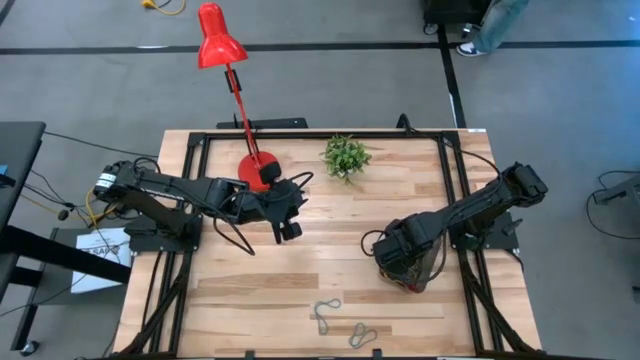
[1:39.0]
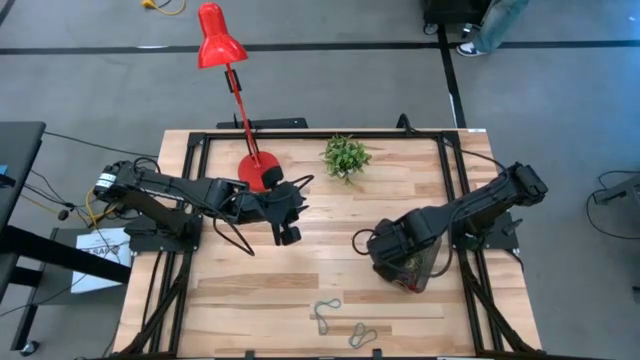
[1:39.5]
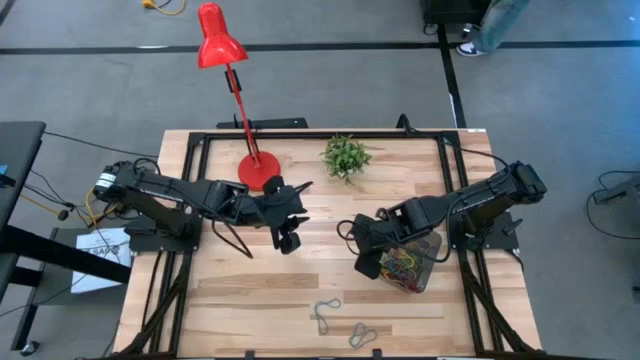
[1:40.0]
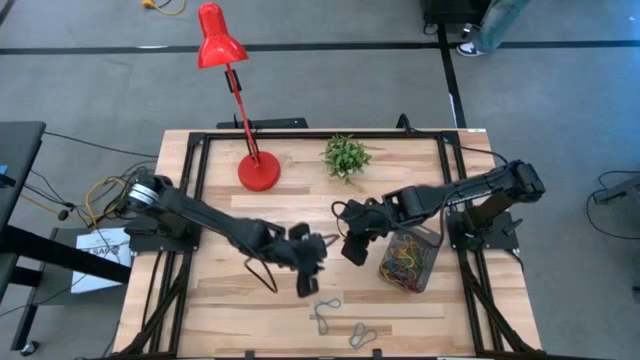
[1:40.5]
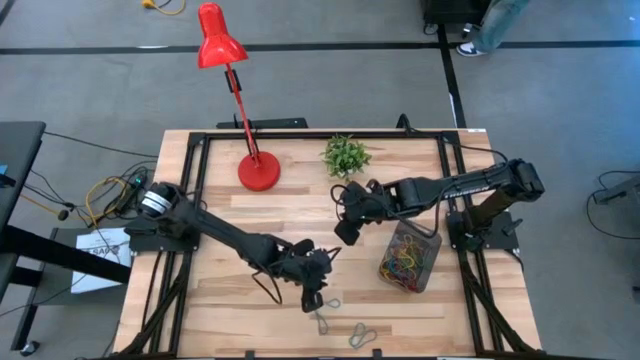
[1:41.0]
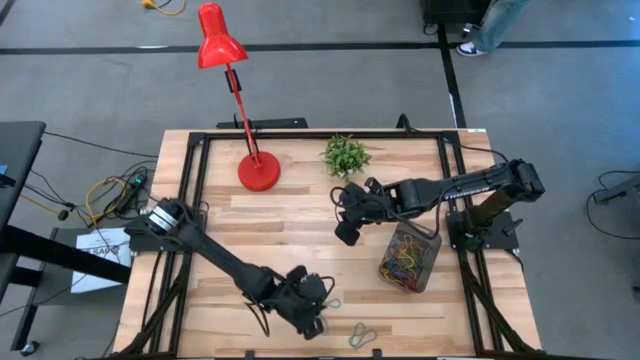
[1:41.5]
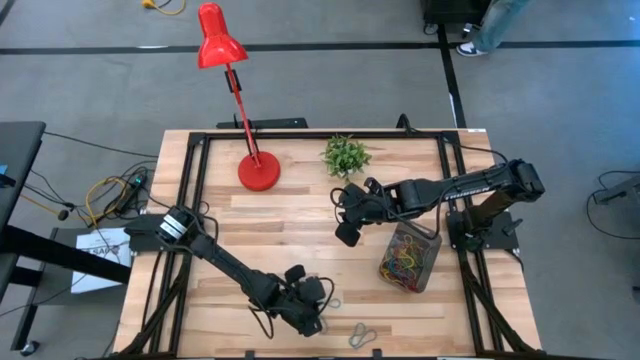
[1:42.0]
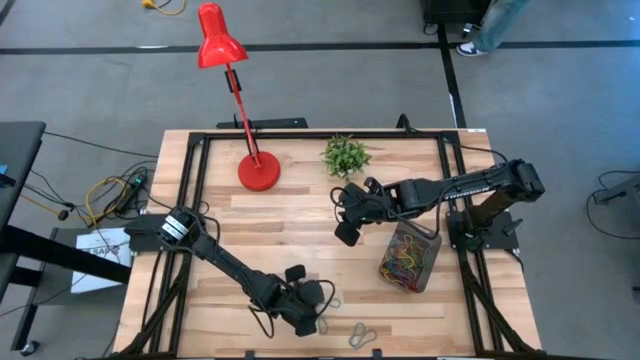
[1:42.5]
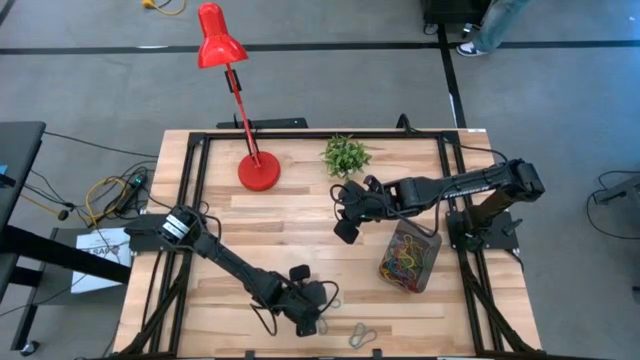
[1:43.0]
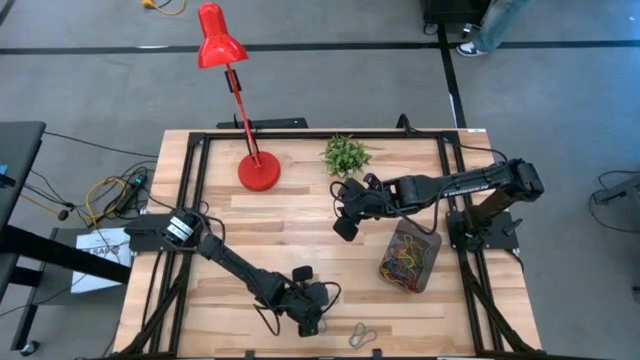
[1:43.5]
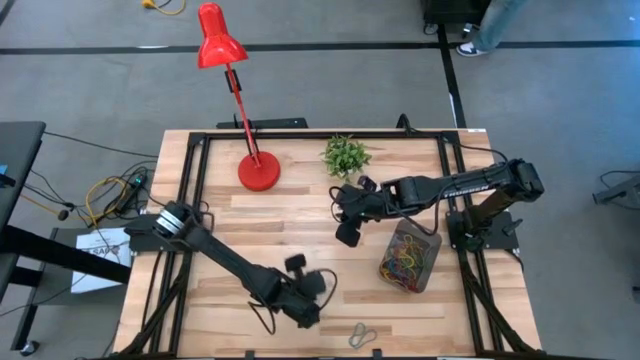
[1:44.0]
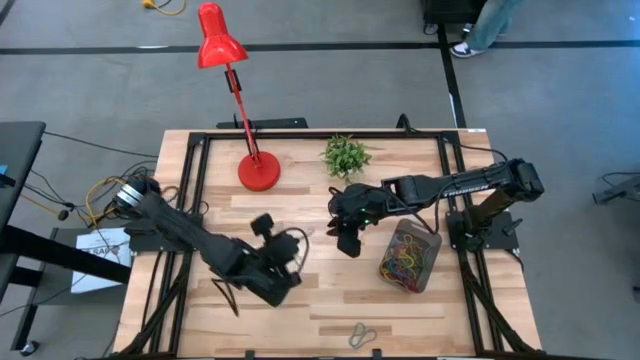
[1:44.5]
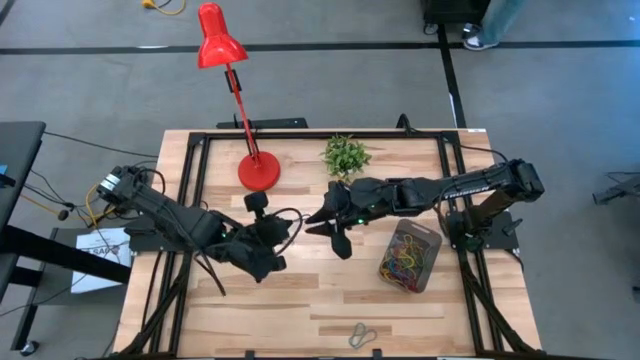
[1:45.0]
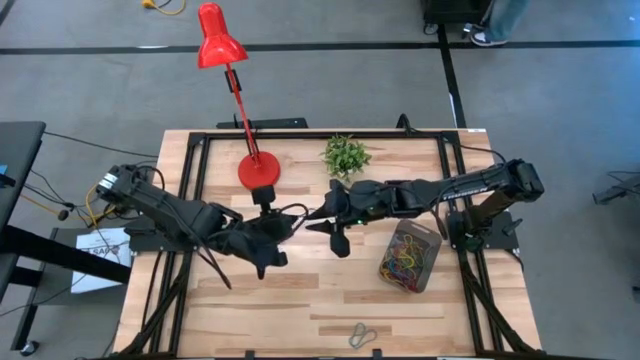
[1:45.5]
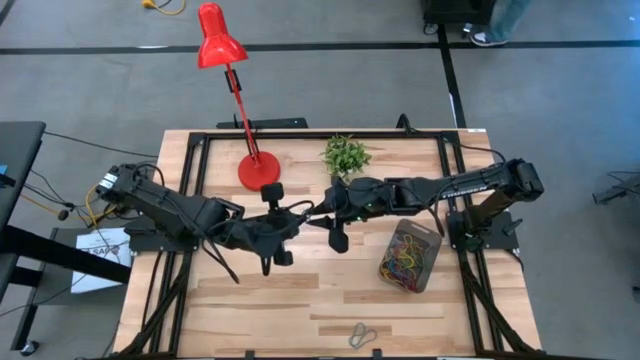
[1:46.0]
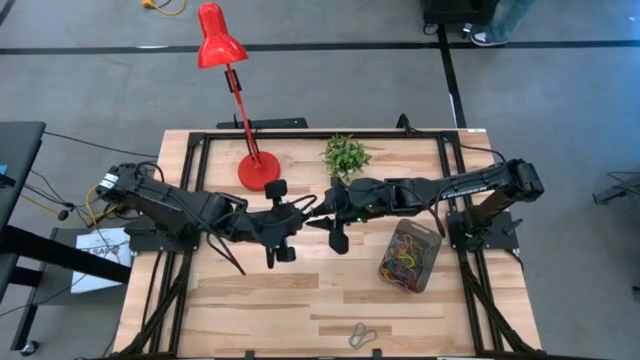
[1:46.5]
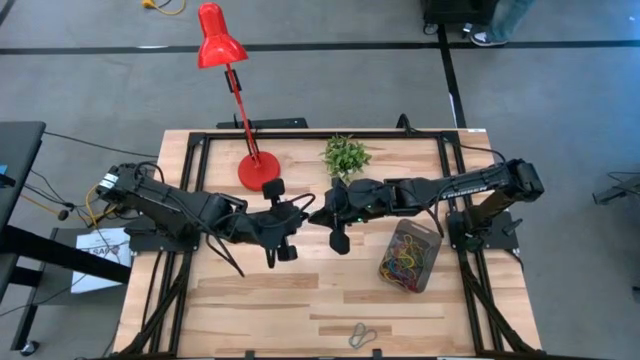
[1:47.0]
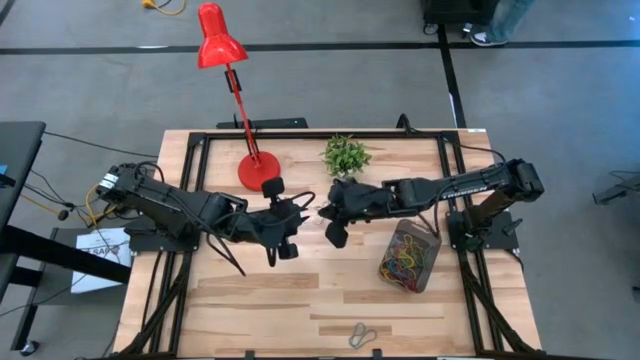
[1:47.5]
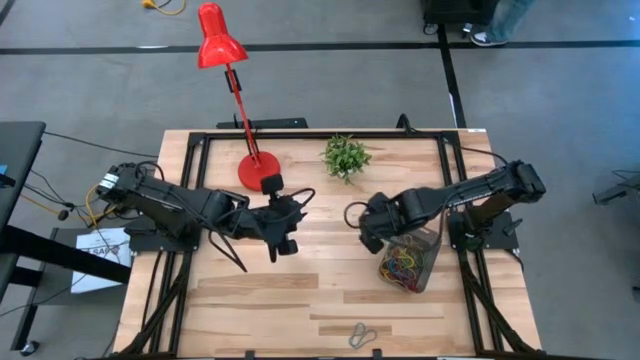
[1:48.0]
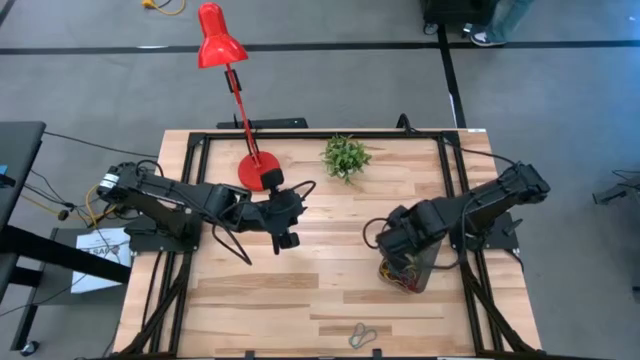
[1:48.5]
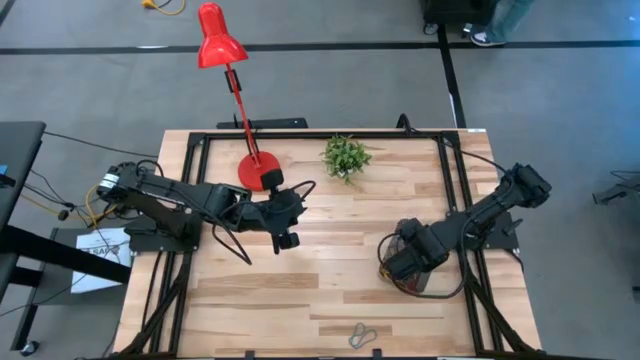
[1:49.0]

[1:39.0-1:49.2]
Task: Pick and place items into bin
Put the blue rubber band into the black bin

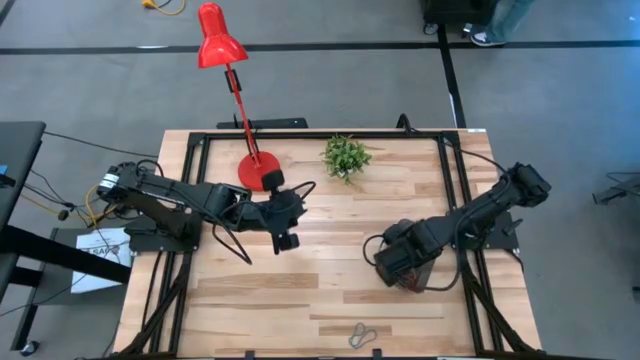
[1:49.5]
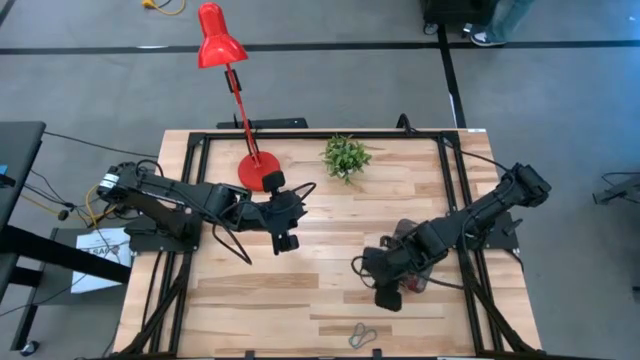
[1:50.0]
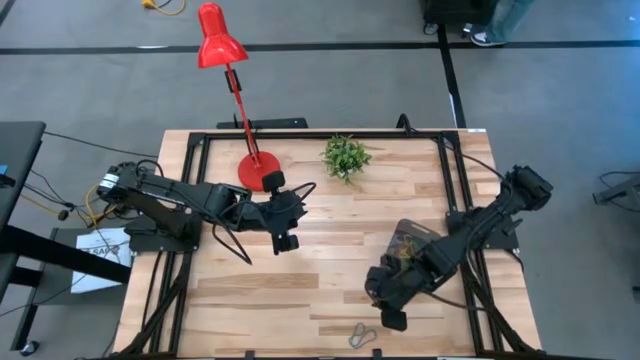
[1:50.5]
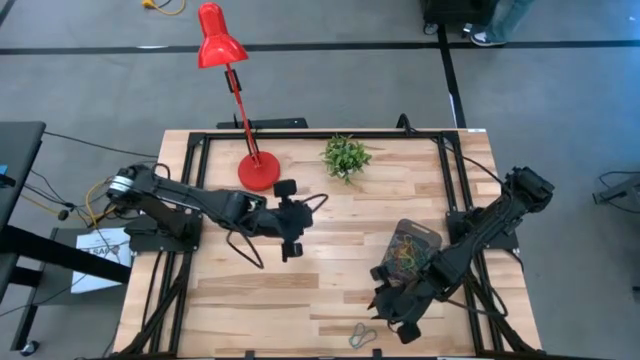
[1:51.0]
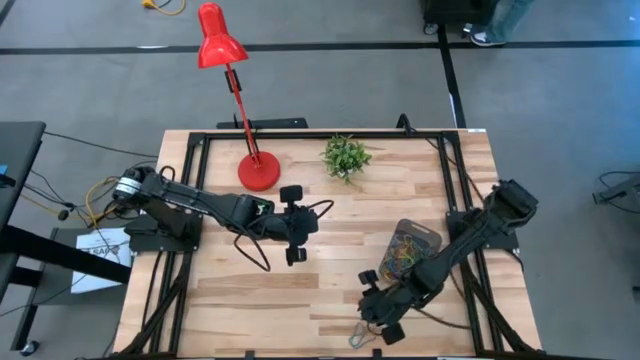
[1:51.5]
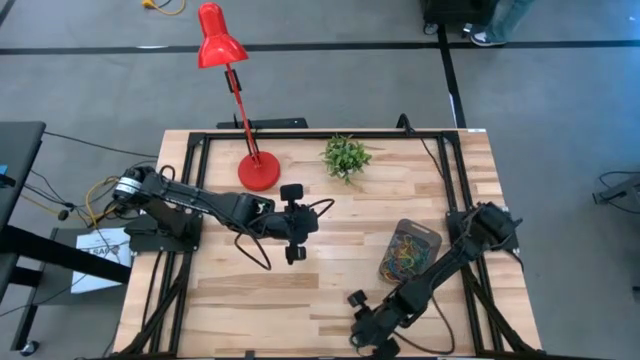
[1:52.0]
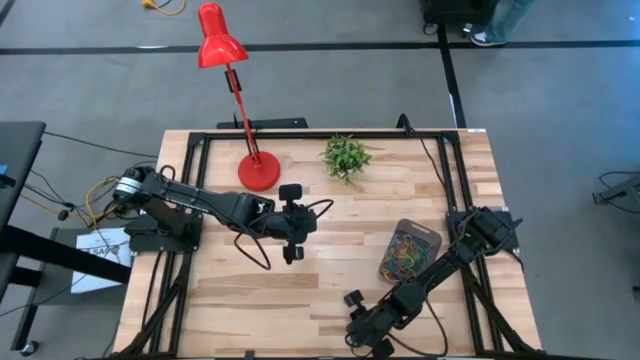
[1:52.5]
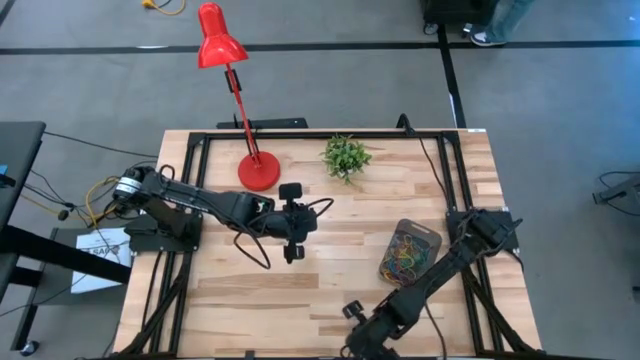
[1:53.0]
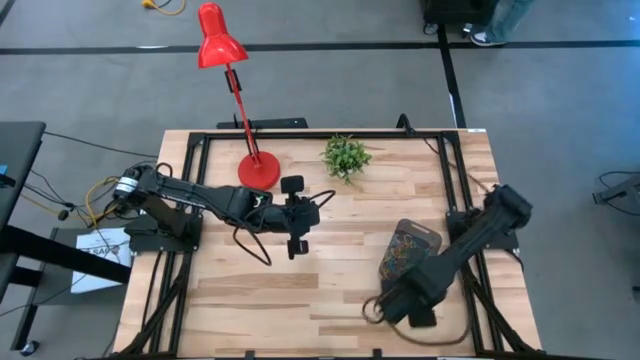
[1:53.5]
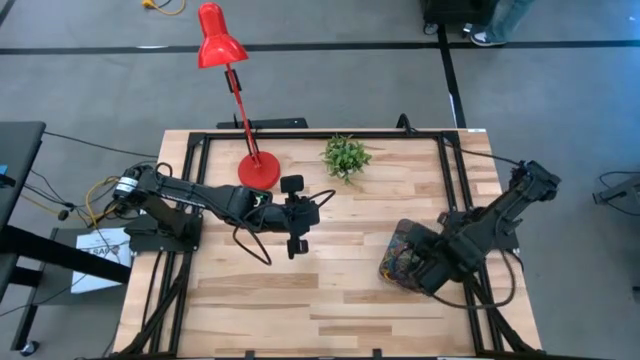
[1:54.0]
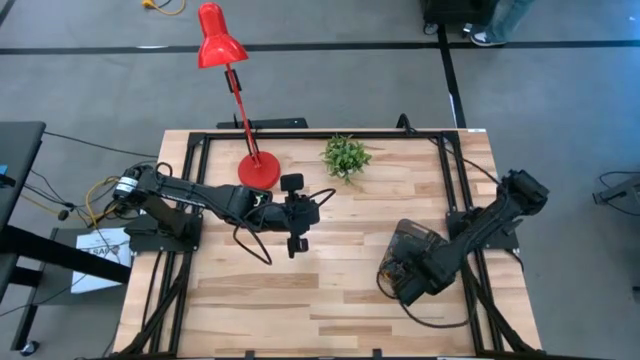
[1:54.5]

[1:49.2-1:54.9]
Put the blue rubber band into the black bin

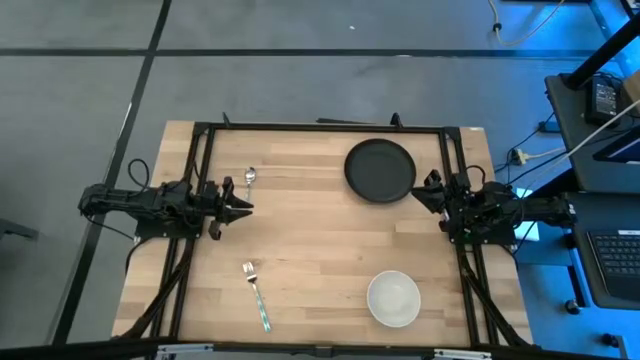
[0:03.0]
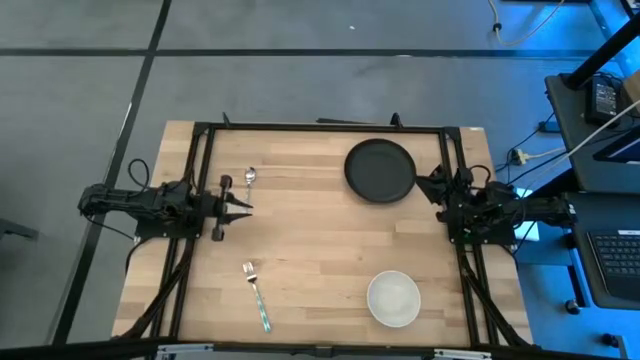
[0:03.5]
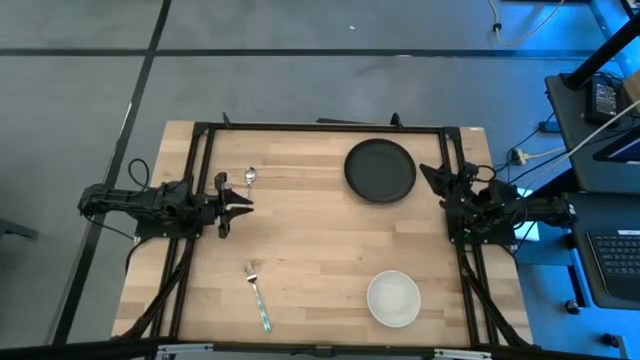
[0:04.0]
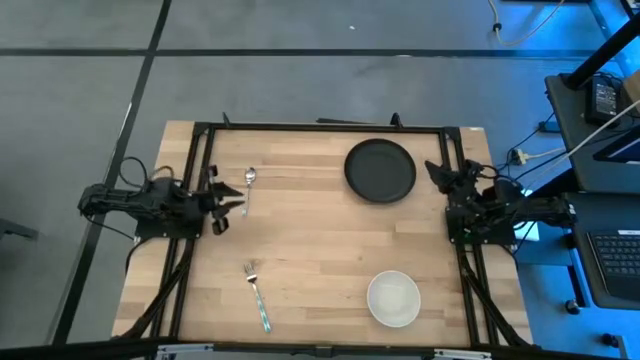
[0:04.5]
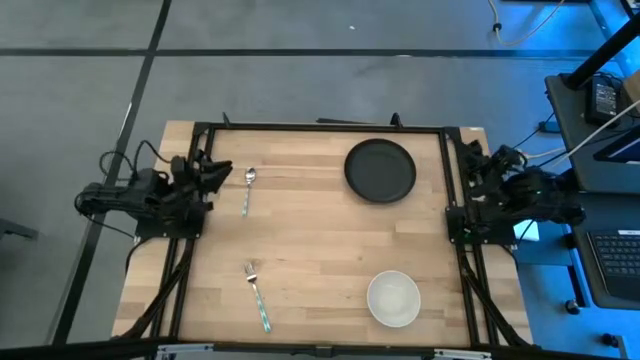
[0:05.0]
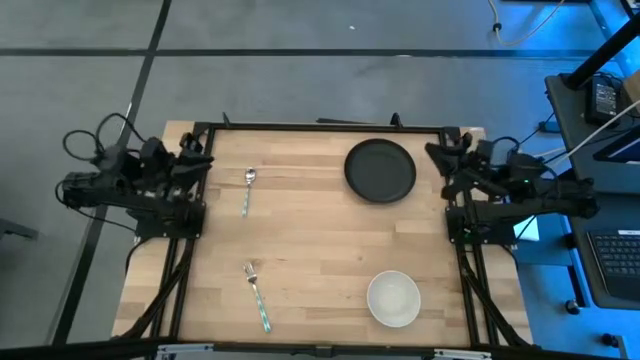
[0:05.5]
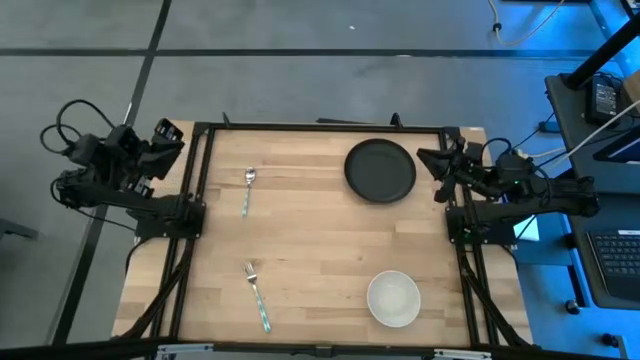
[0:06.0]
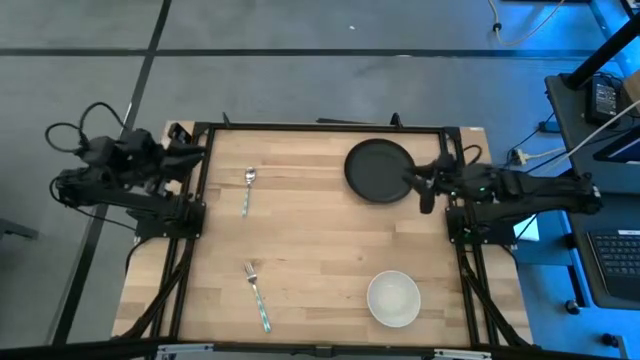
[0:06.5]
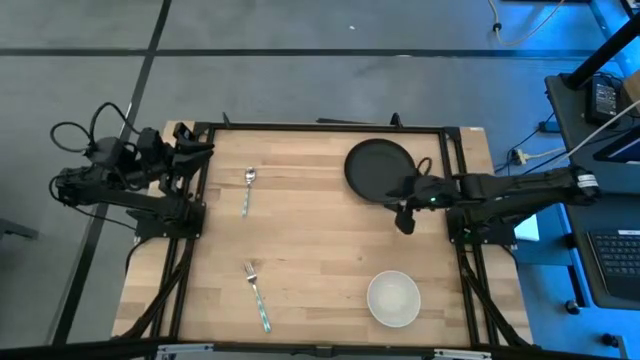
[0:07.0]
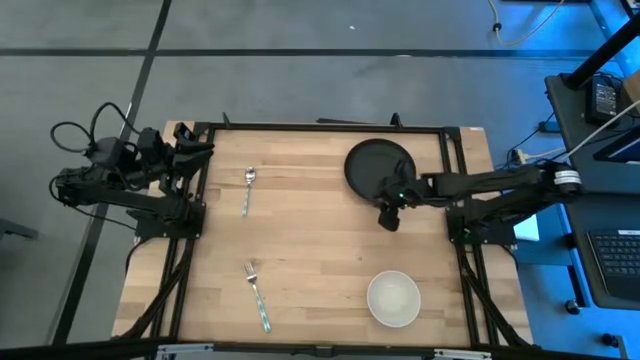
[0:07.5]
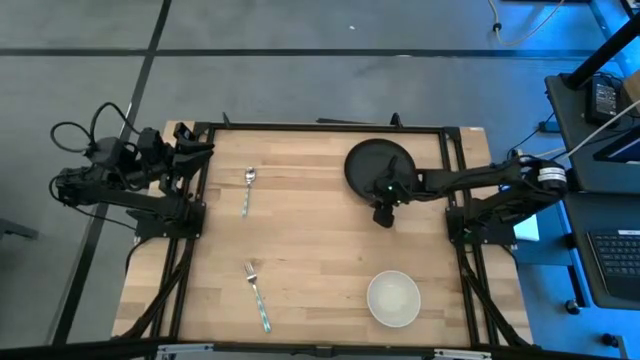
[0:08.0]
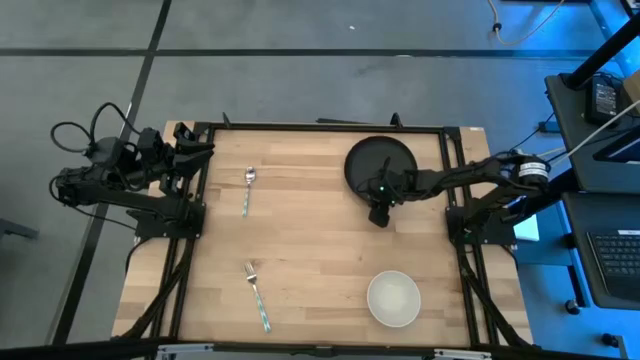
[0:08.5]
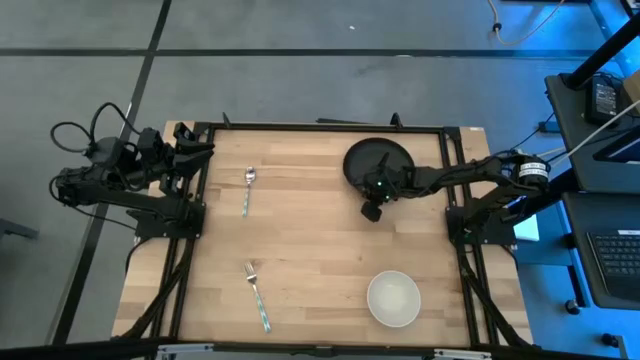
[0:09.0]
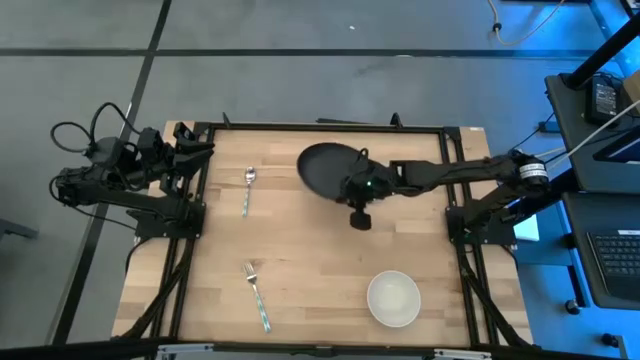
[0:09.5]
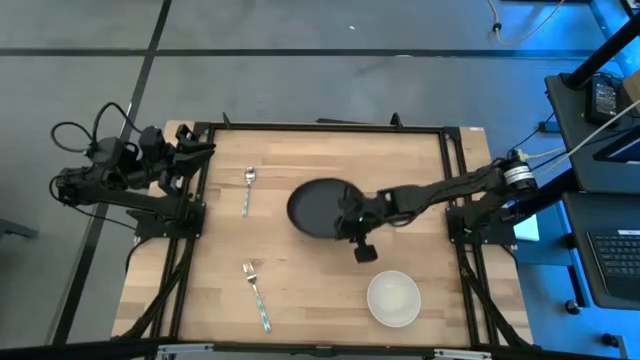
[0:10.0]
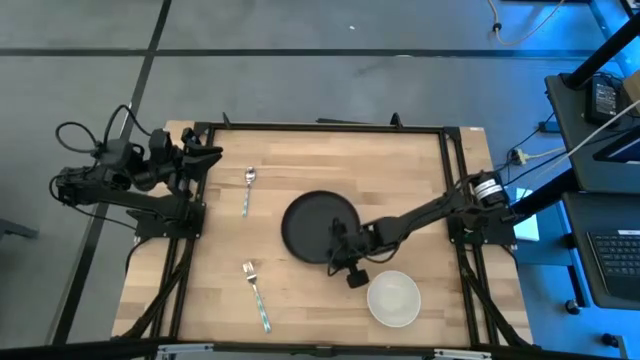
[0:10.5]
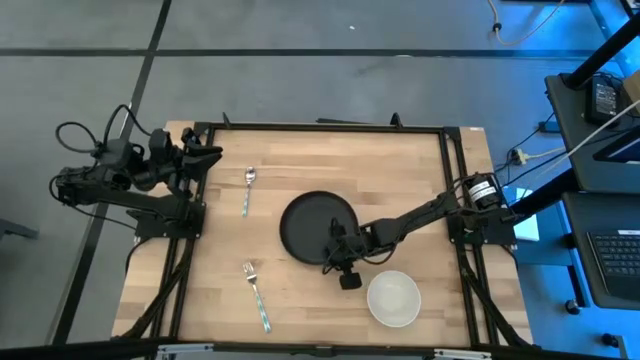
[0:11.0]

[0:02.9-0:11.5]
Task: Set table place
Put the black plate on the center of the table
